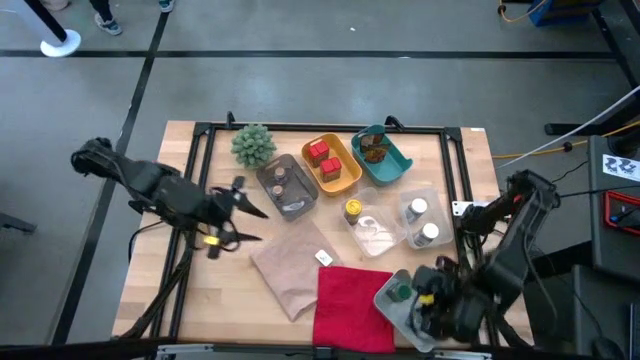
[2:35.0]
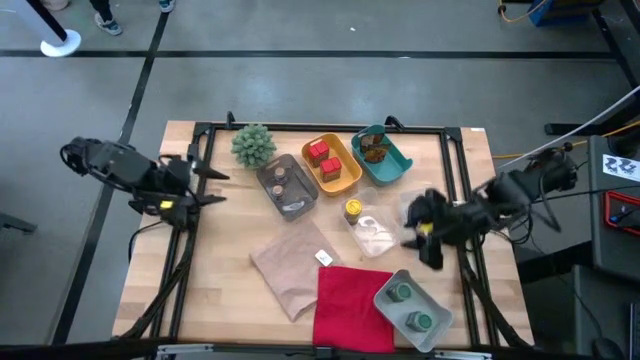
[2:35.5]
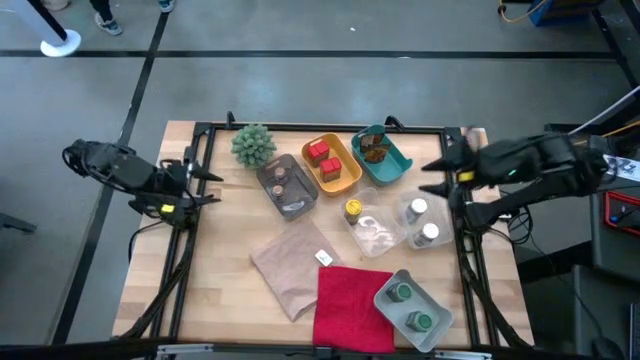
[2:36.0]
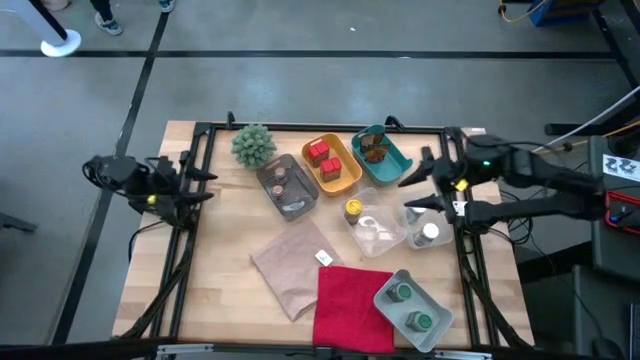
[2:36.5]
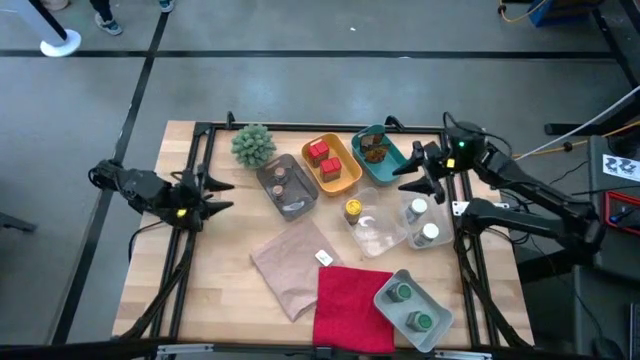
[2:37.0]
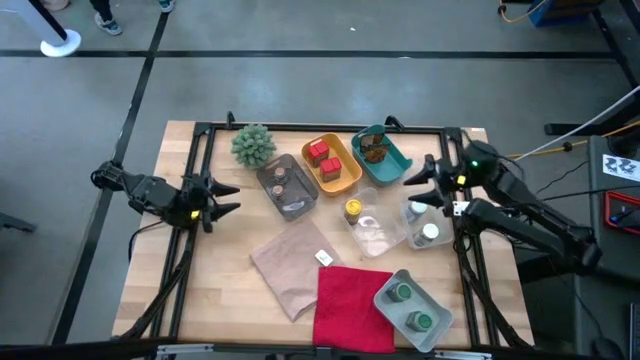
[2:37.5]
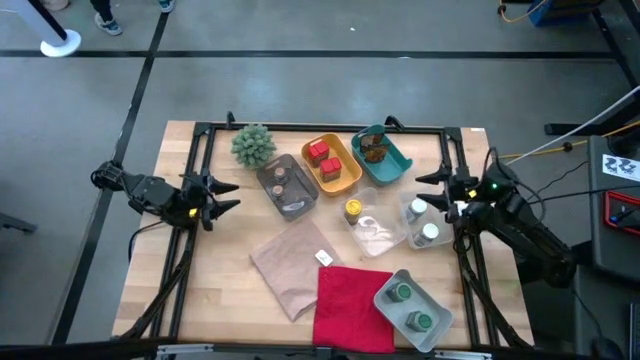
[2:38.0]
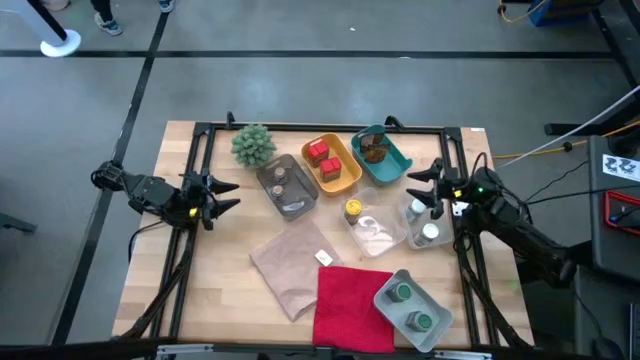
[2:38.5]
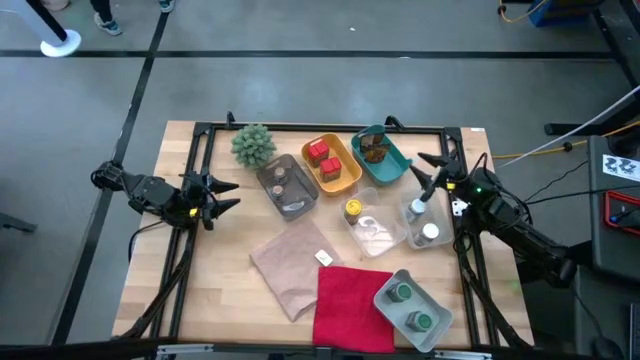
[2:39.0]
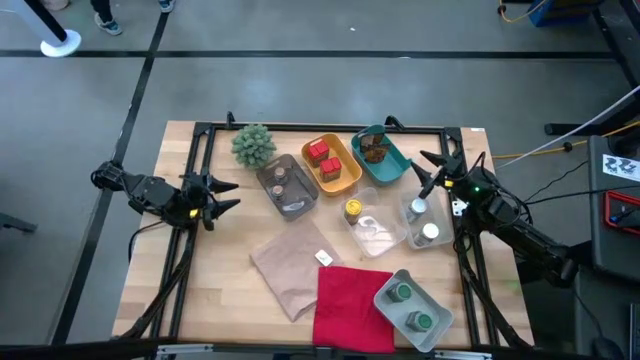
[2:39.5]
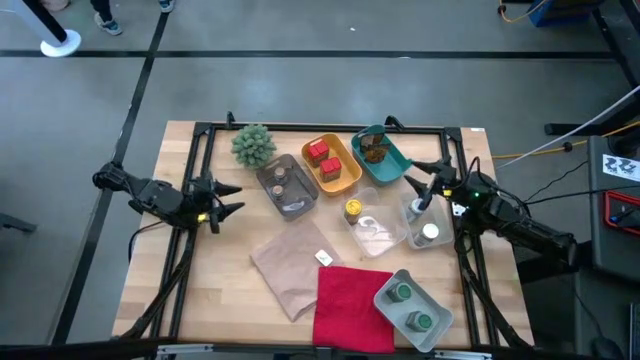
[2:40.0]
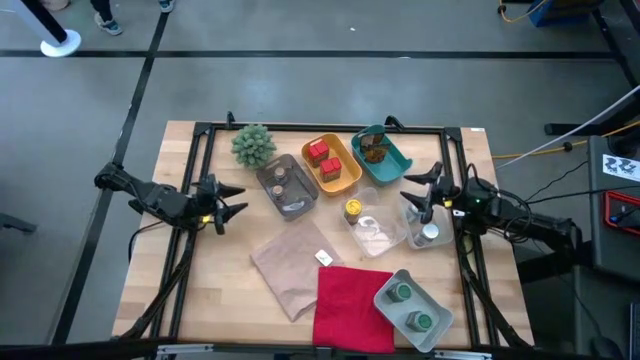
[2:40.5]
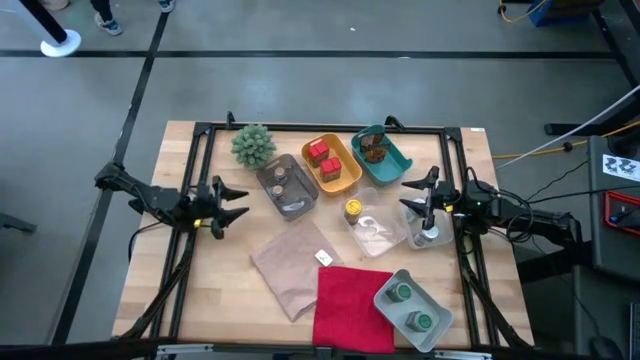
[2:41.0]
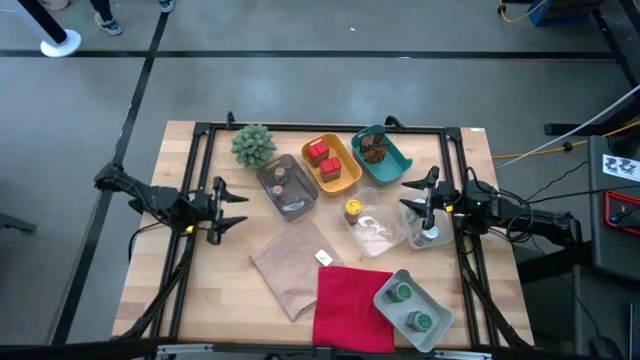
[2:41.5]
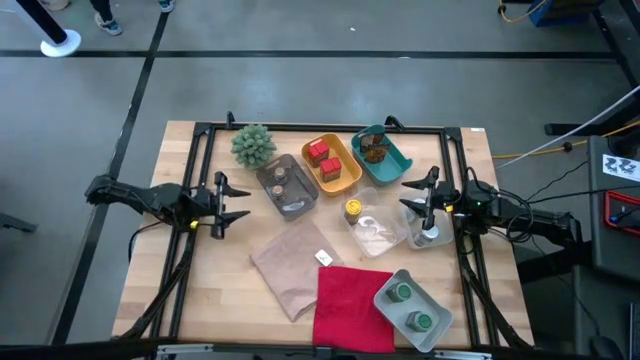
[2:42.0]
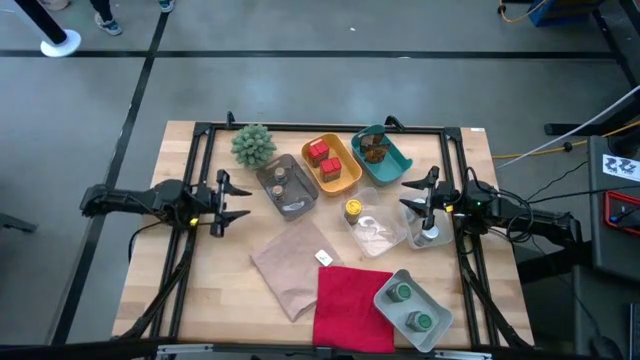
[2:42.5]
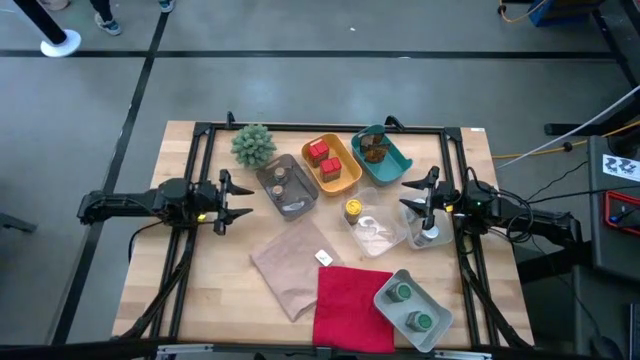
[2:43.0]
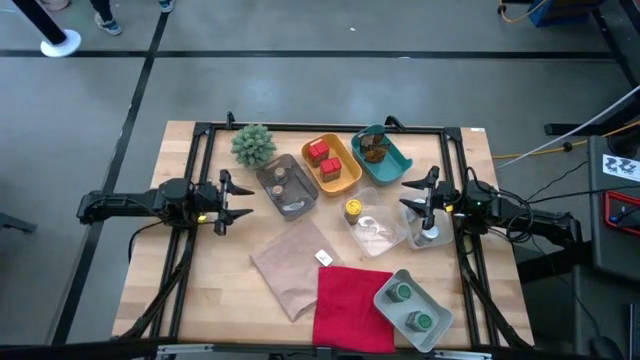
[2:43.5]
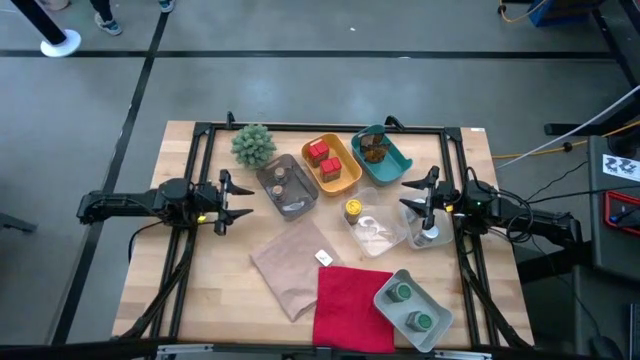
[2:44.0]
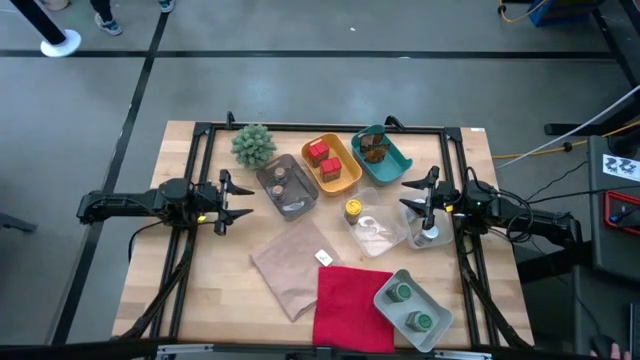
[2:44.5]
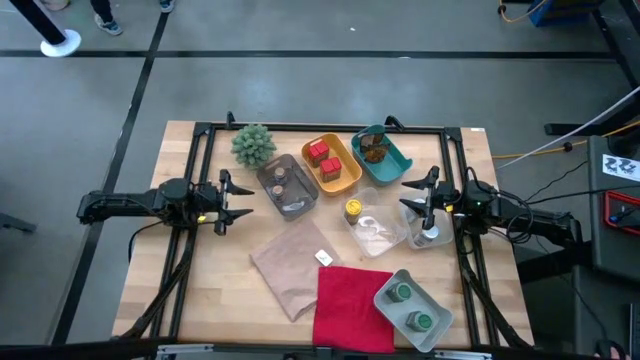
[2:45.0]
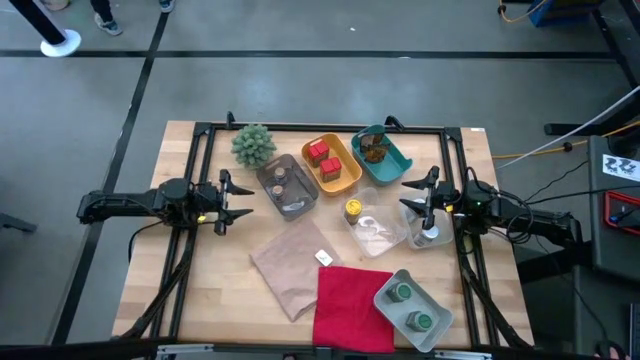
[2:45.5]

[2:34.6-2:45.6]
Task: Sort spices by type
Return to Home Position

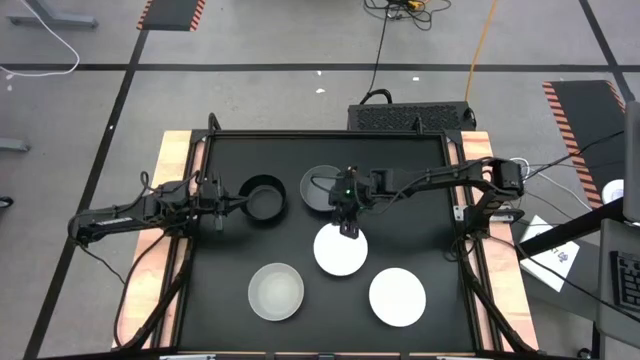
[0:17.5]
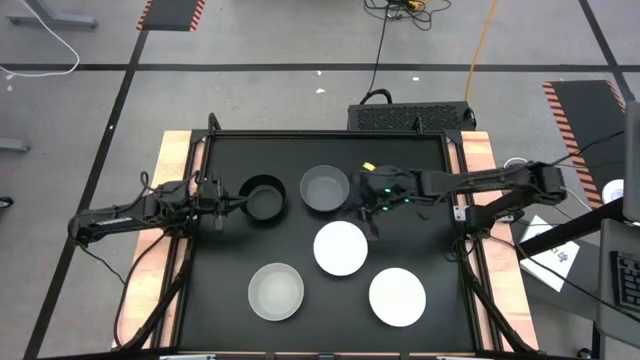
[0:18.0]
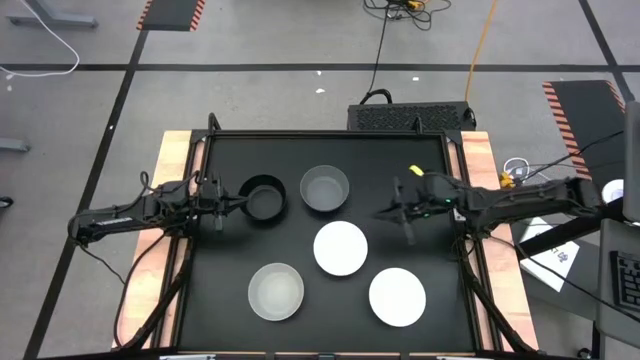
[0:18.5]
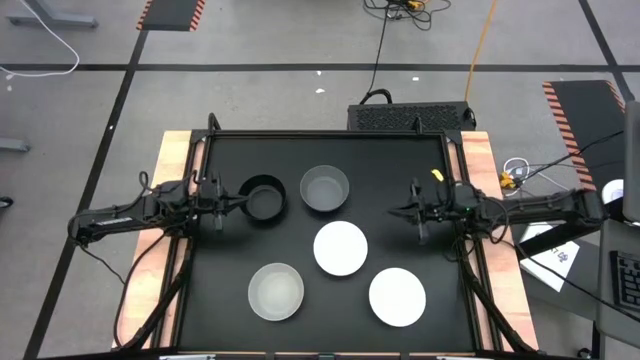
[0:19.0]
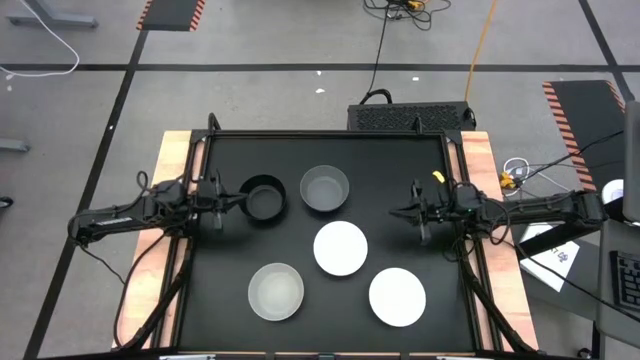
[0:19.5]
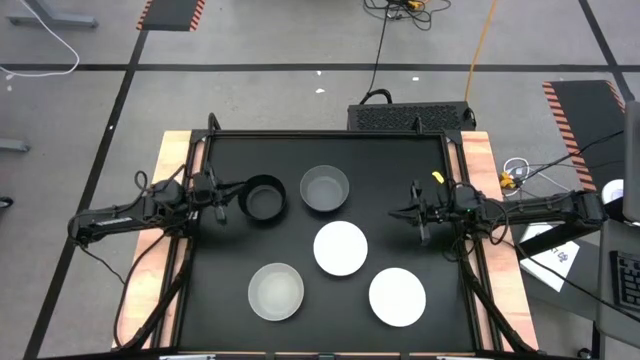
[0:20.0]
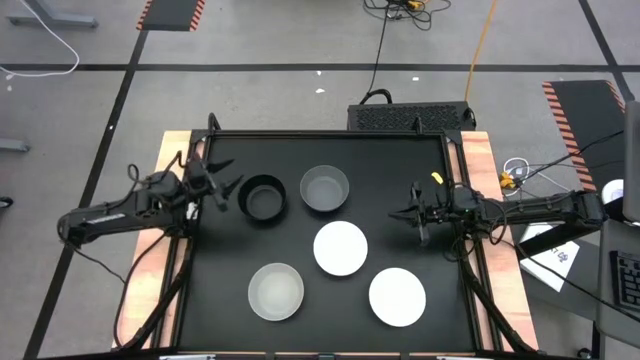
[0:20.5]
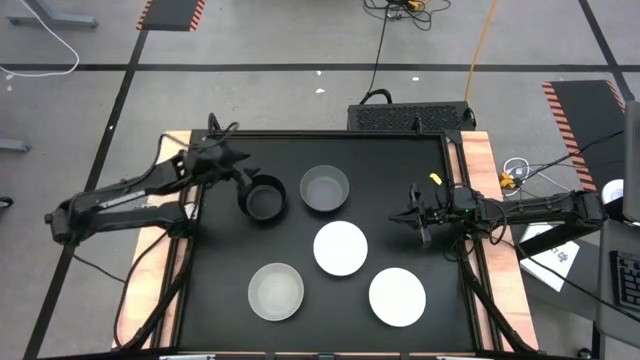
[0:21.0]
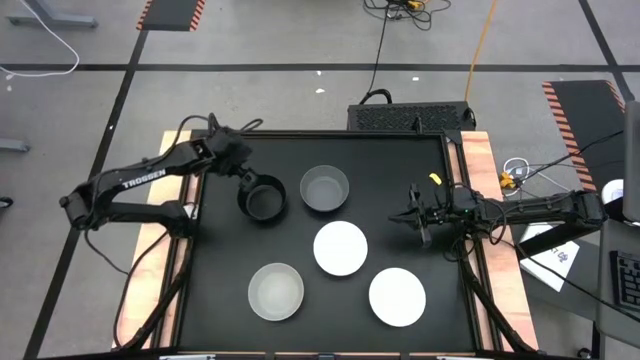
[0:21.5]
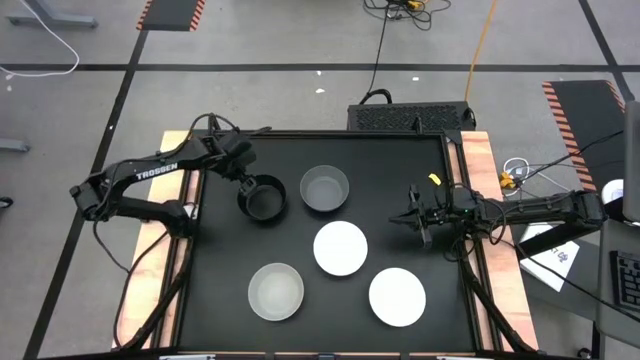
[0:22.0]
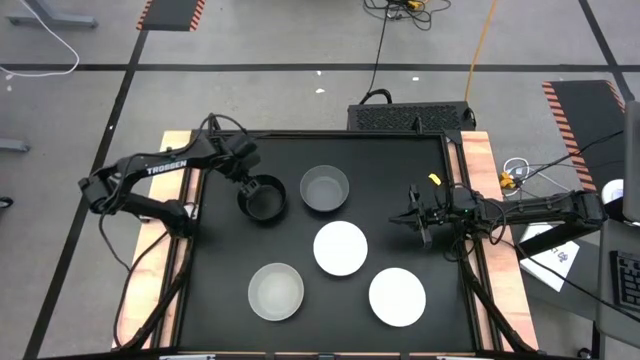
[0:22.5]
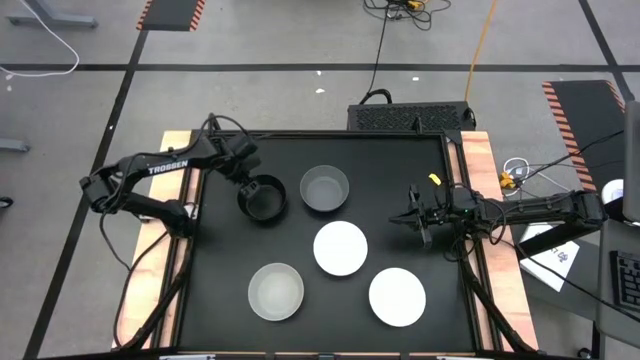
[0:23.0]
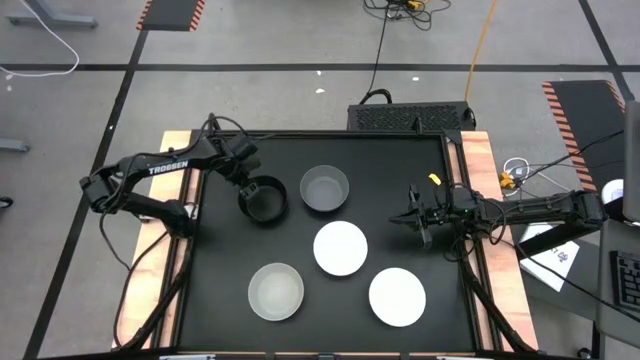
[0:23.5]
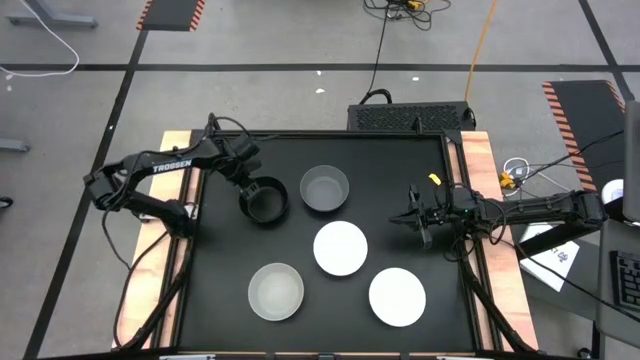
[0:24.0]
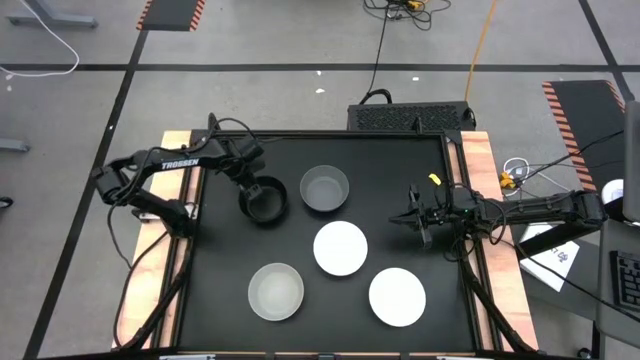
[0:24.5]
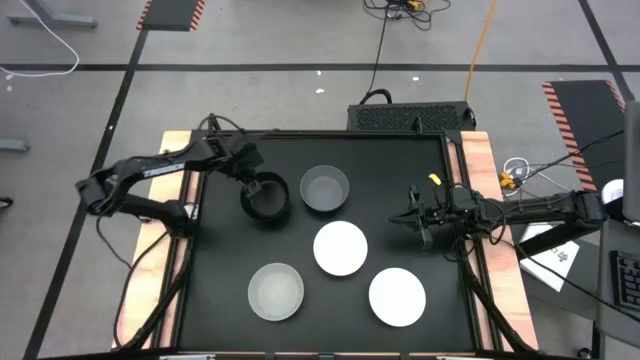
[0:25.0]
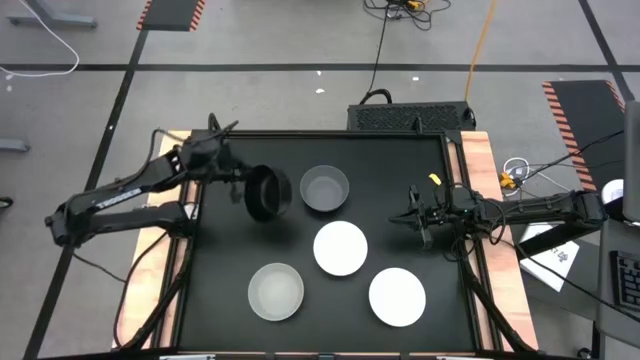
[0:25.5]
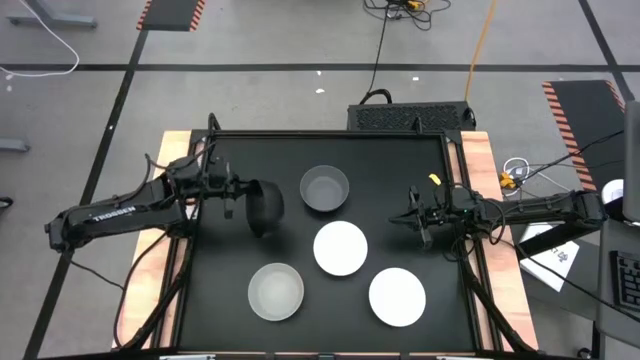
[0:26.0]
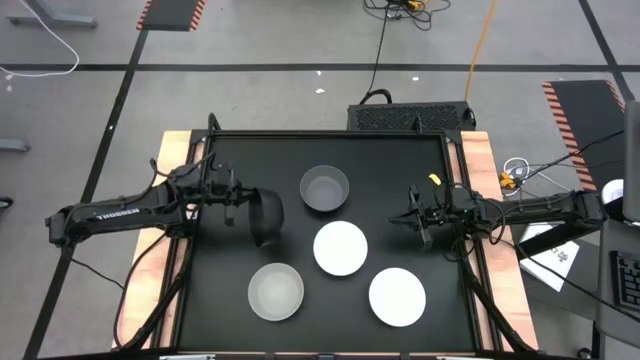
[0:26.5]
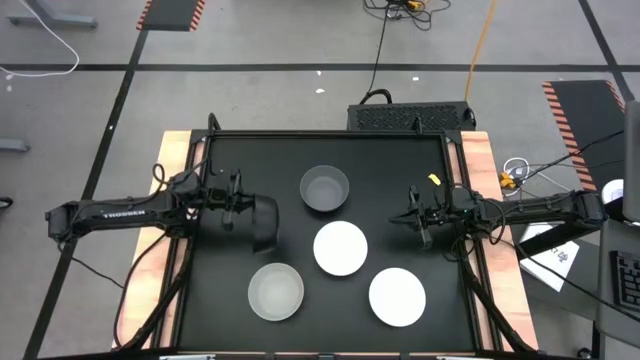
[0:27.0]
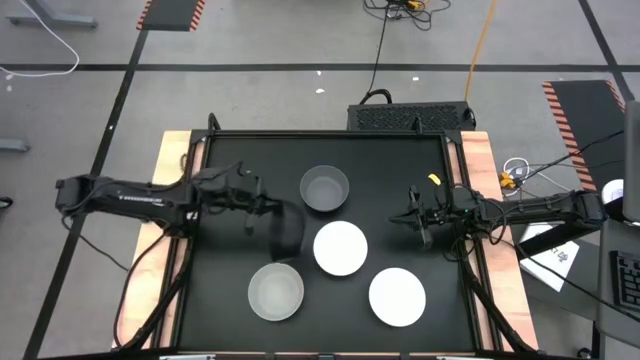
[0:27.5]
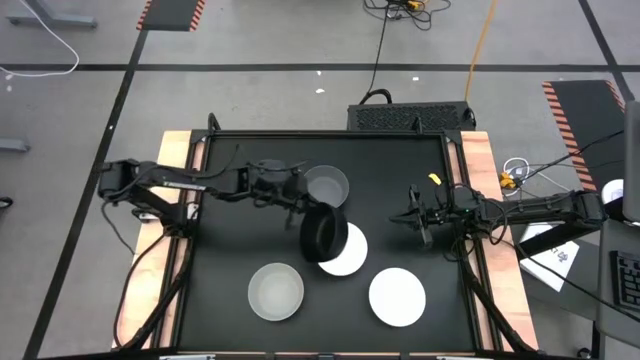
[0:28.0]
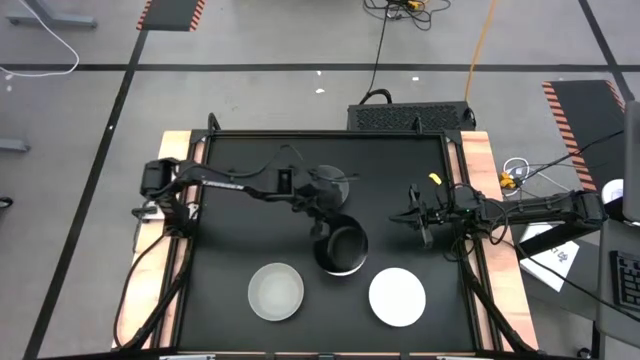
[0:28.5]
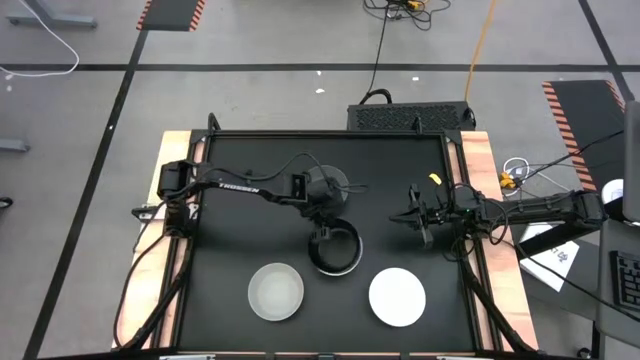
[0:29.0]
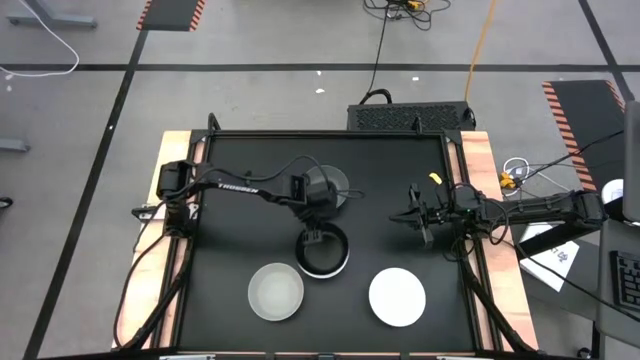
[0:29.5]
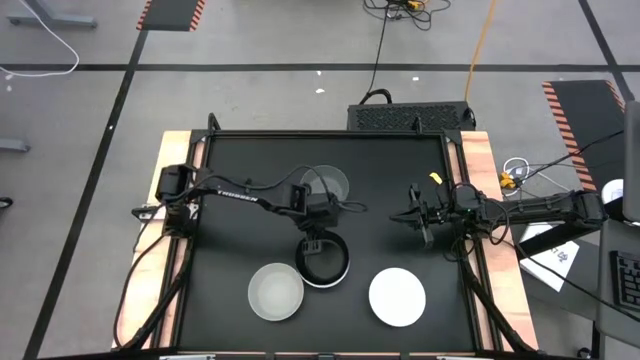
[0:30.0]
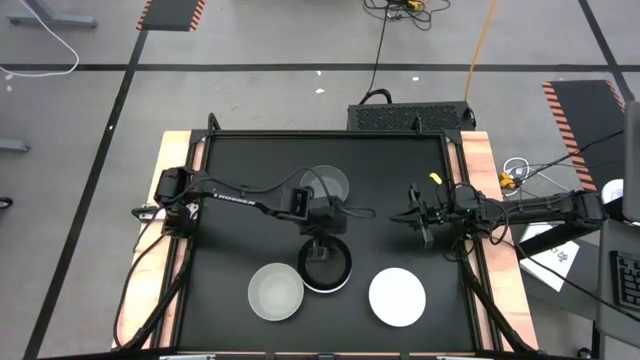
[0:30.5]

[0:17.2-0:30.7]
Task: Nest bowls inside each other
Stack the black bowl on the left white bowl
